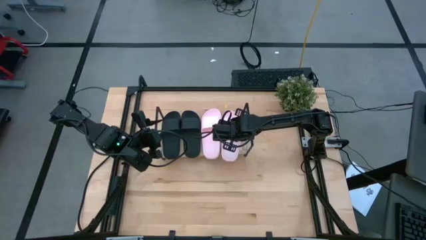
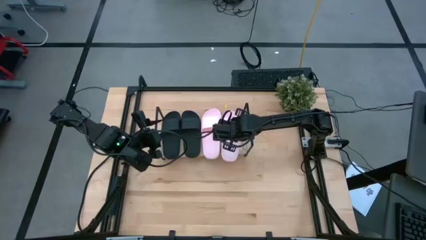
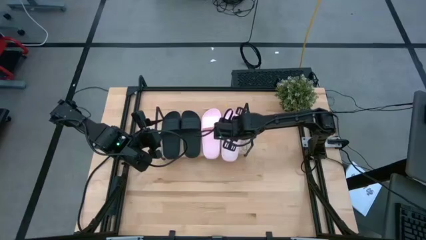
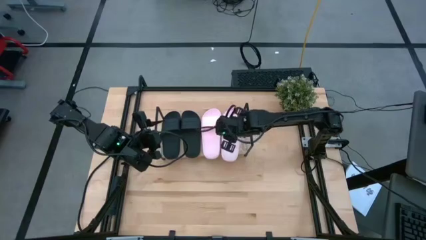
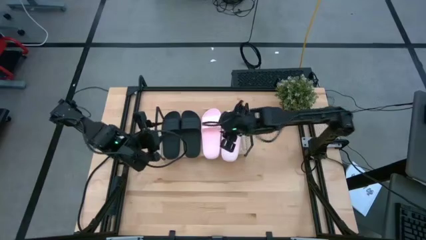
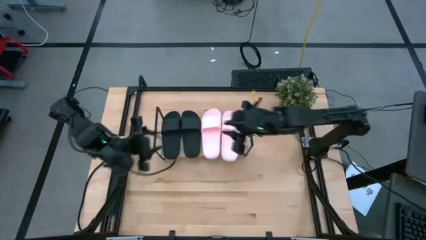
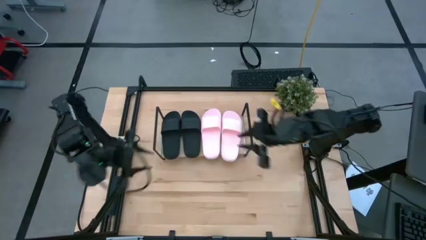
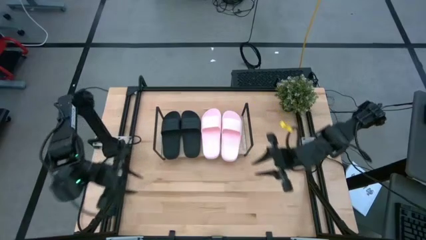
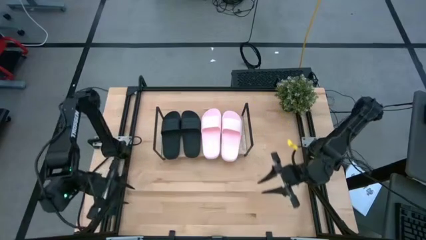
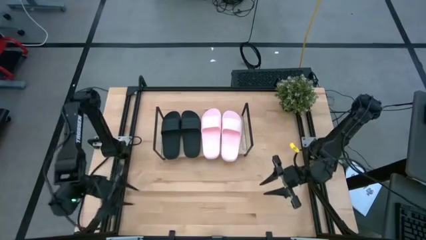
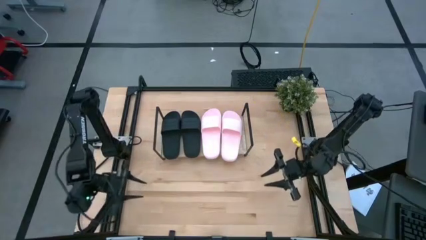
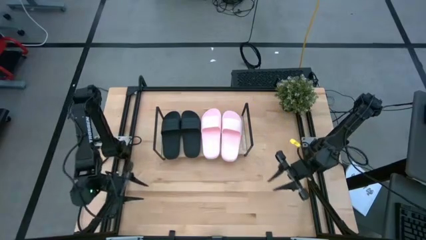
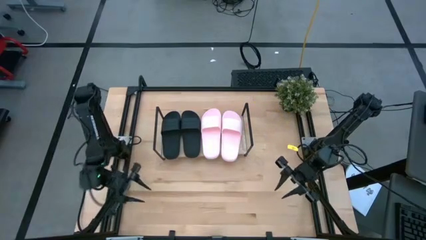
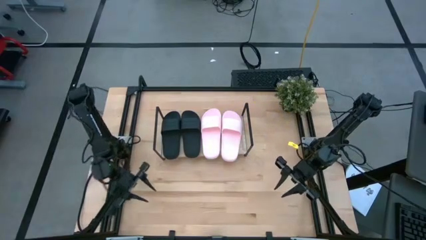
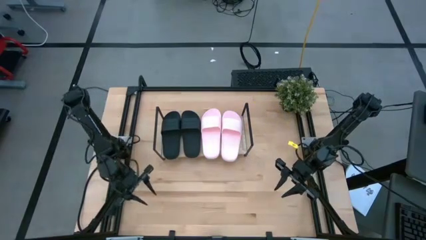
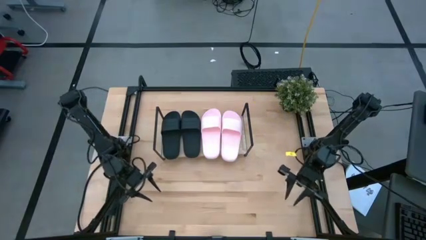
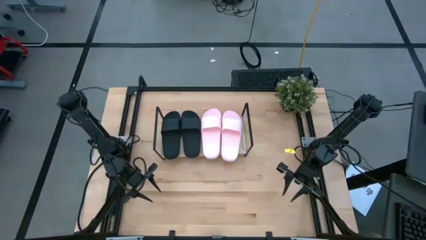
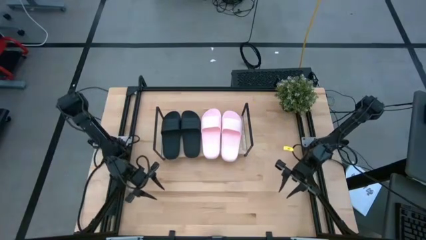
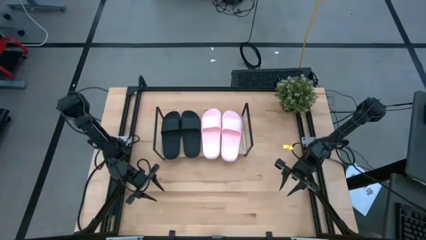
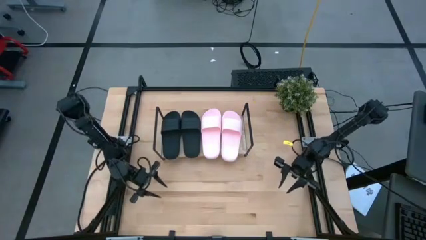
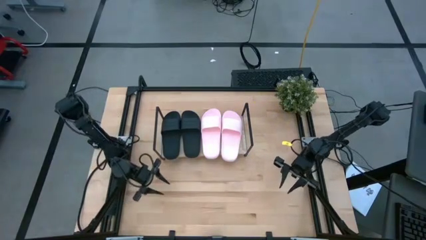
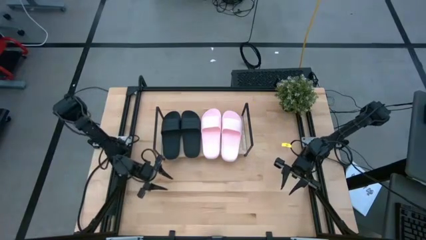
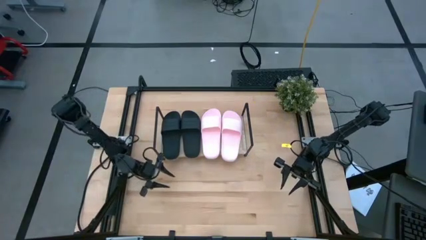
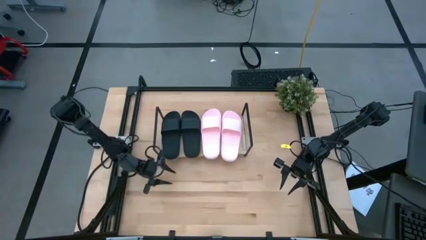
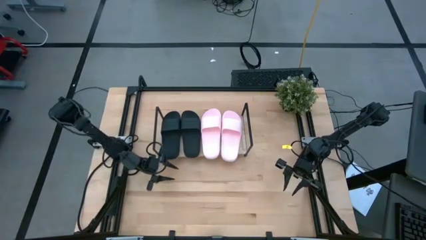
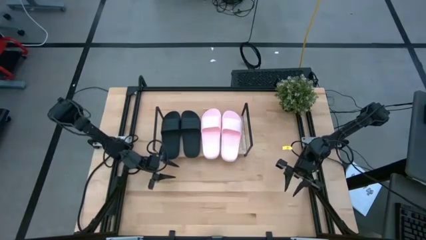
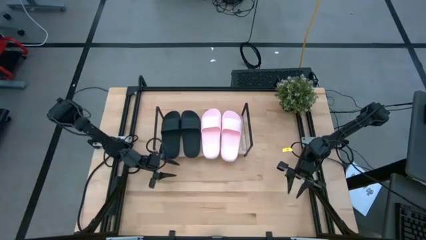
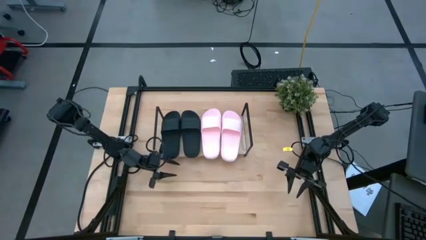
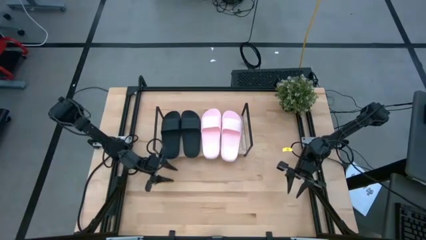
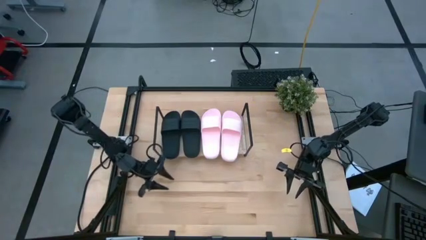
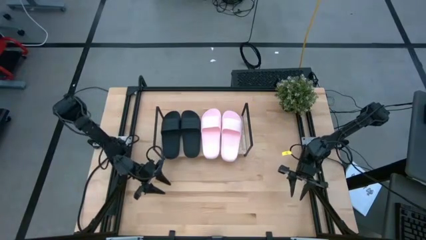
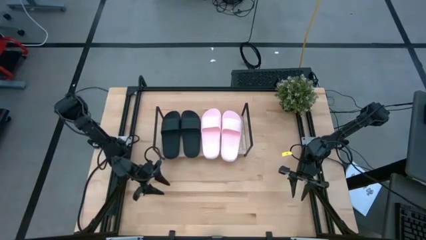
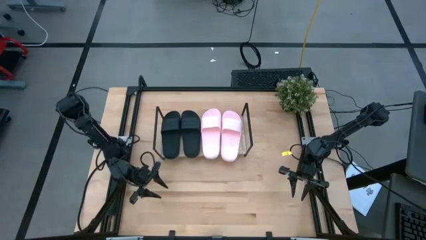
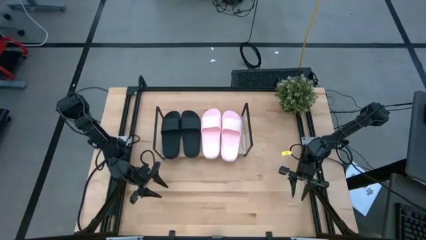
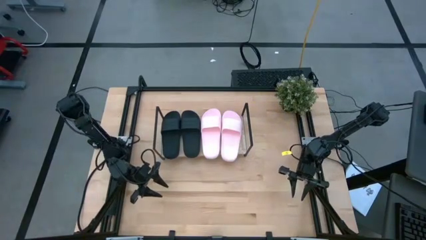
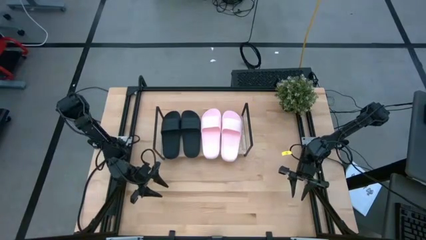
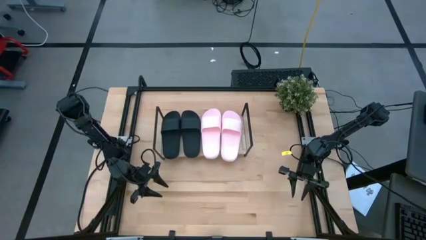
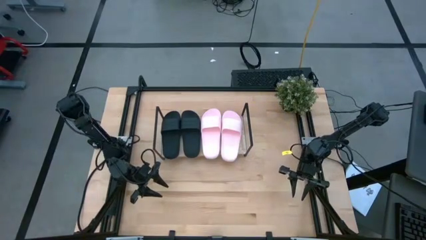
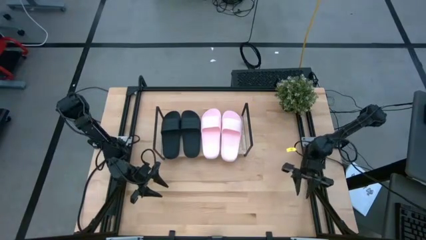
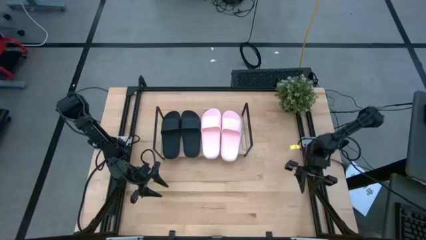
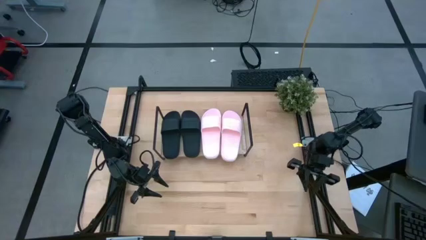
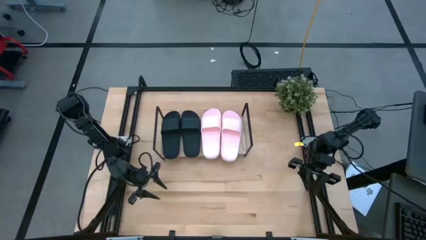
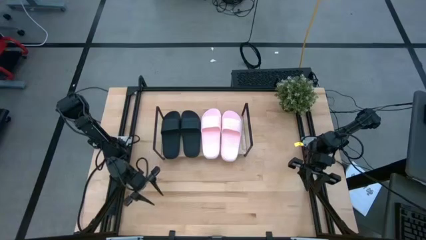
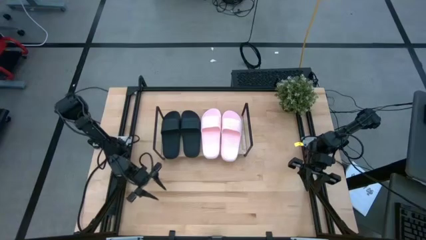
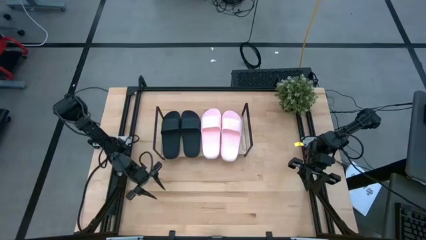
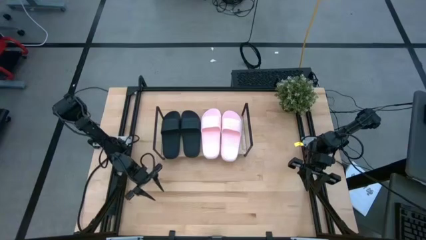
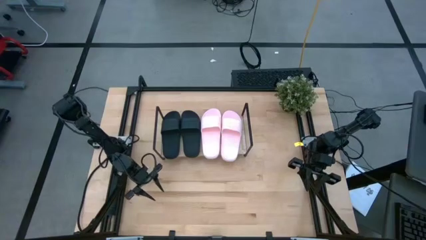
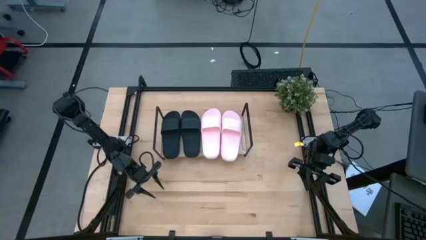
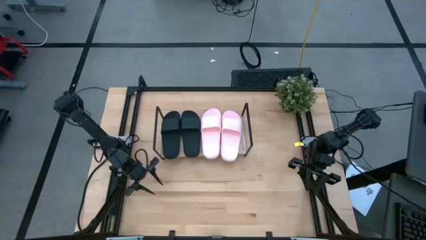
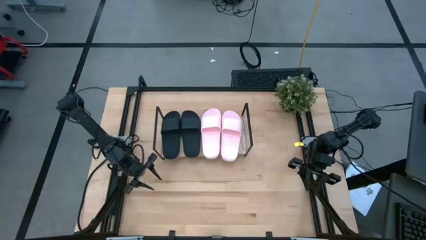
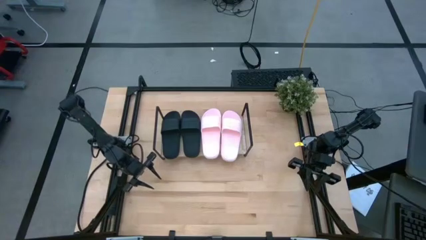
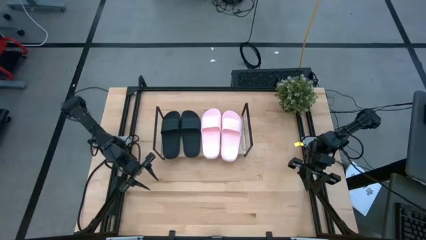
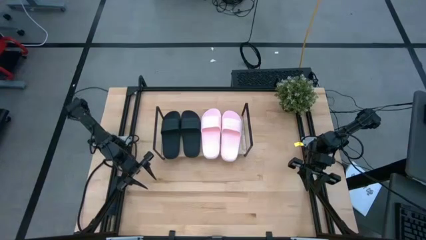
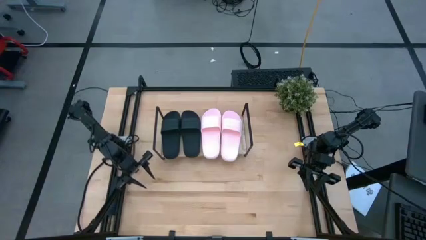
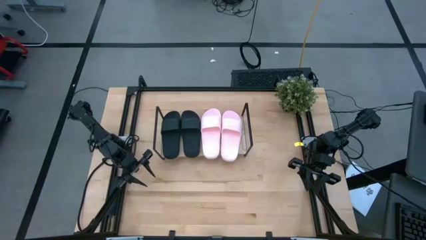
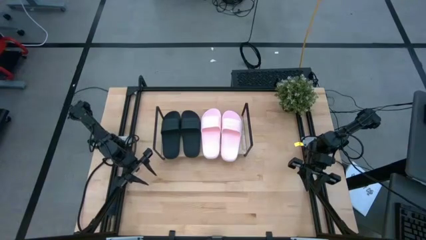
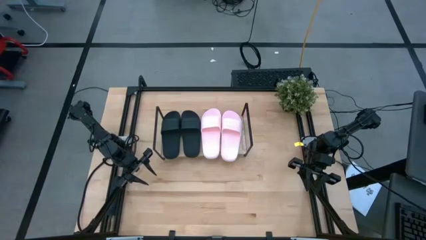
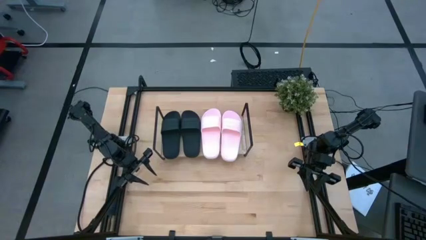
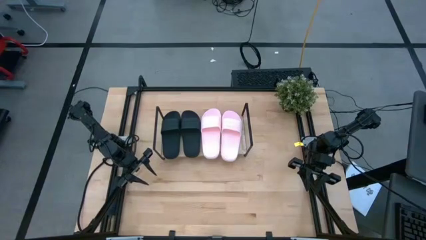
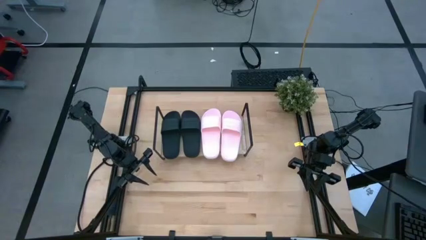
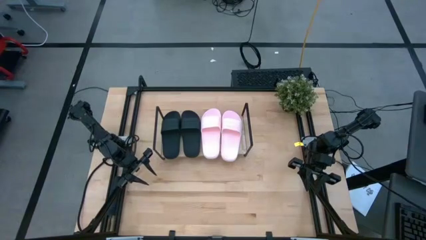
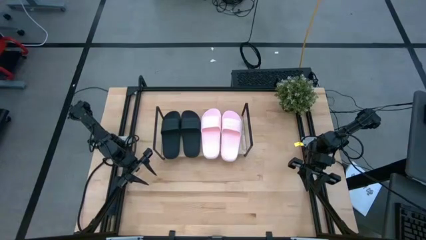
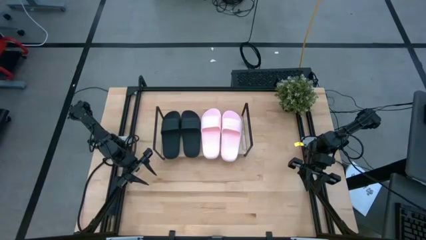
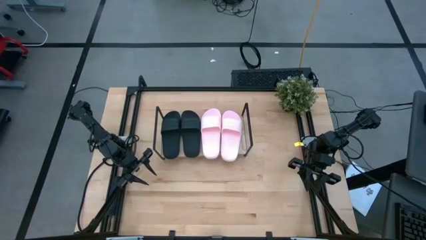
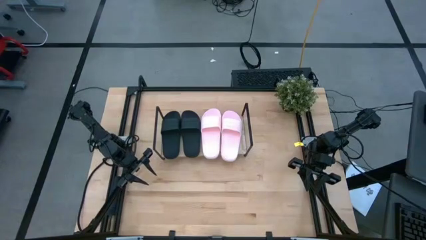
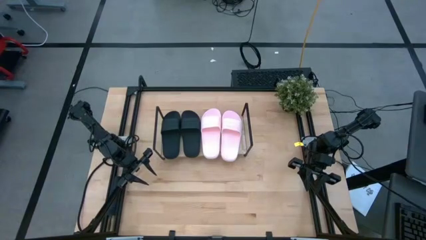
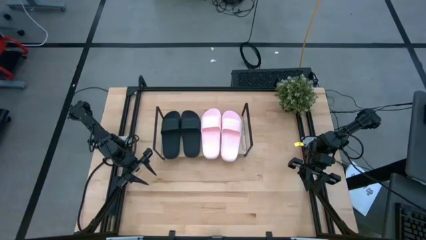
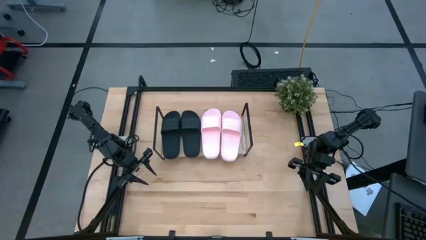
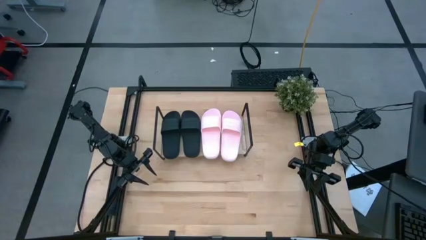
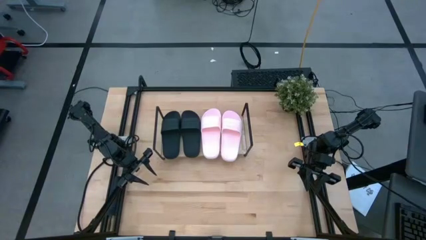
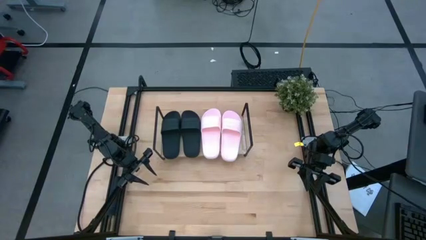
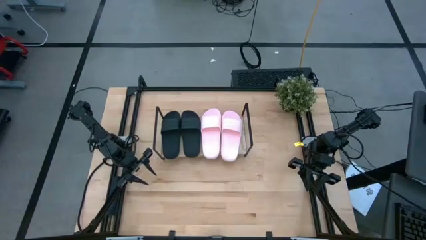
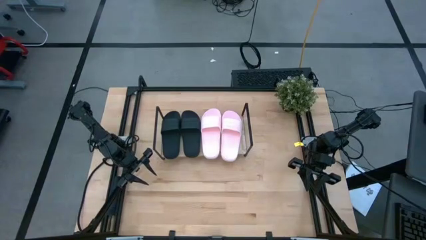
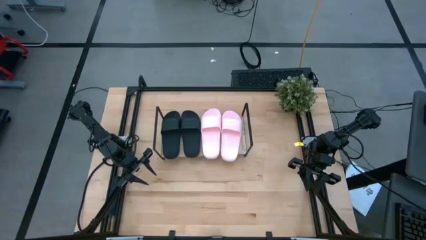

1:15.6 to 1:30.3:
Task: Pick and place slides into the shelf
Return to Home Position
